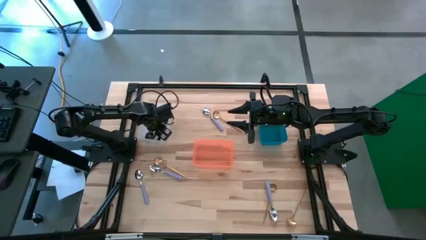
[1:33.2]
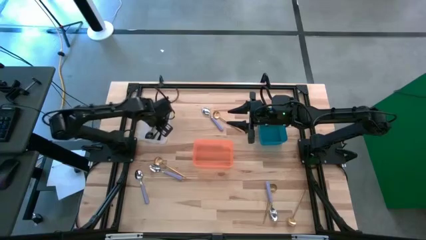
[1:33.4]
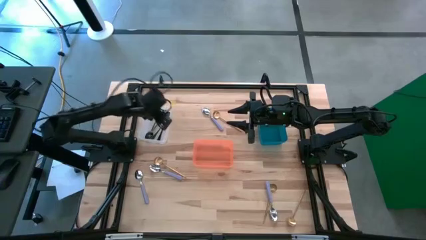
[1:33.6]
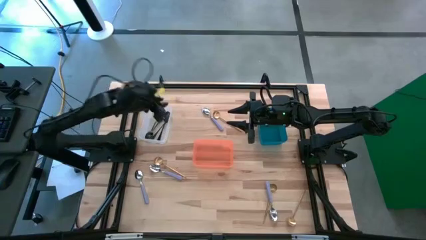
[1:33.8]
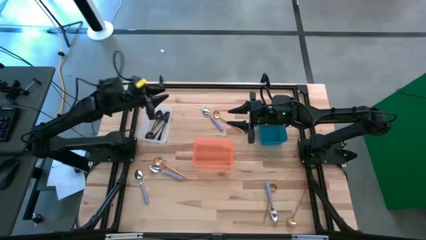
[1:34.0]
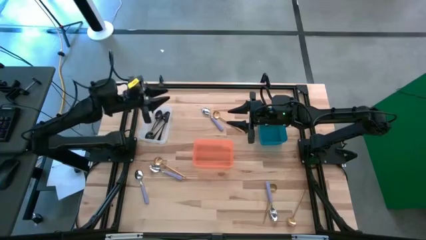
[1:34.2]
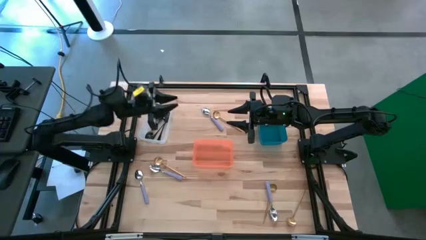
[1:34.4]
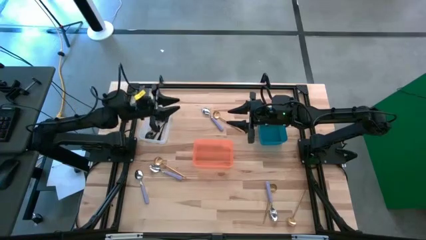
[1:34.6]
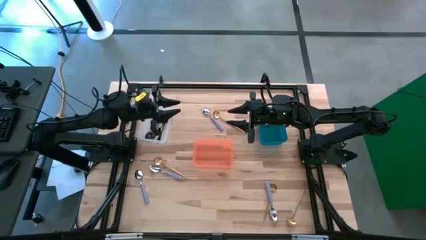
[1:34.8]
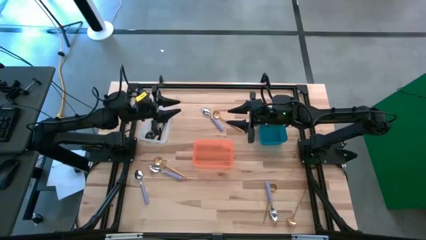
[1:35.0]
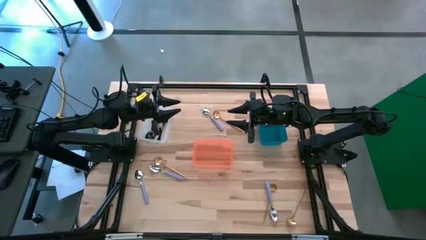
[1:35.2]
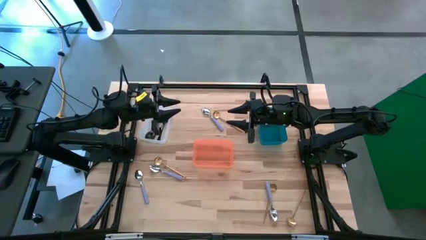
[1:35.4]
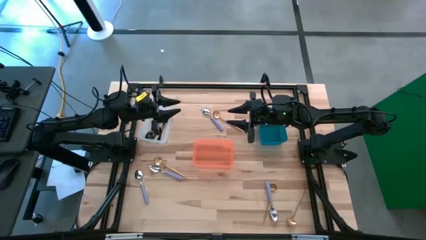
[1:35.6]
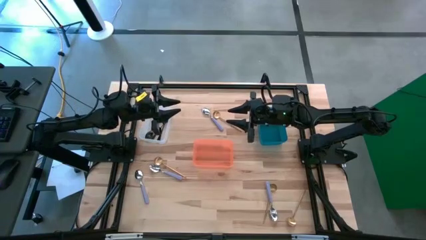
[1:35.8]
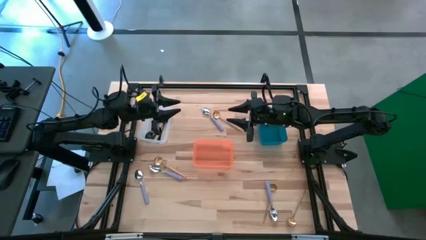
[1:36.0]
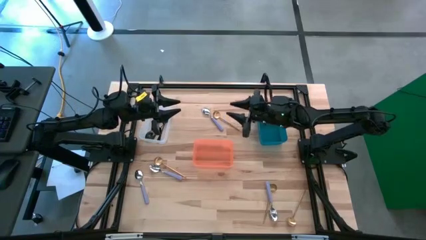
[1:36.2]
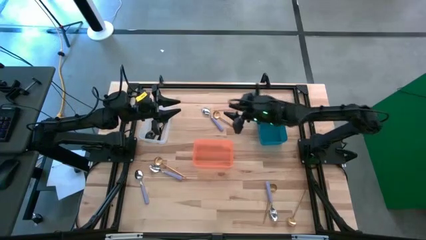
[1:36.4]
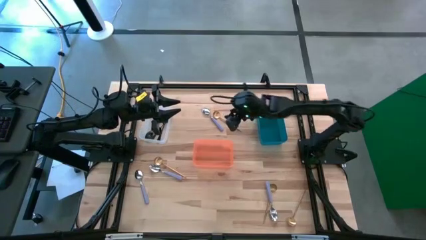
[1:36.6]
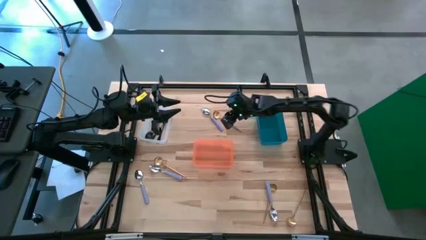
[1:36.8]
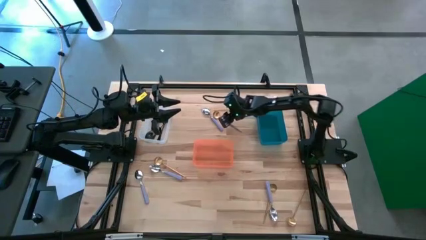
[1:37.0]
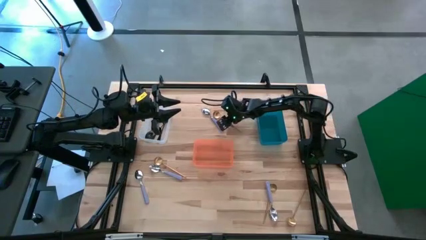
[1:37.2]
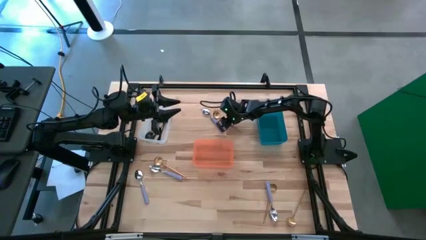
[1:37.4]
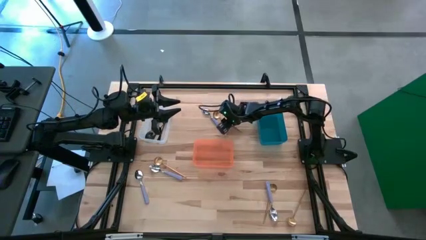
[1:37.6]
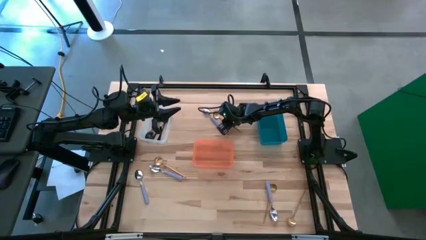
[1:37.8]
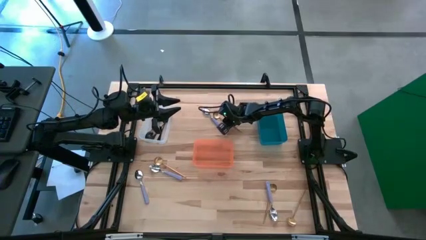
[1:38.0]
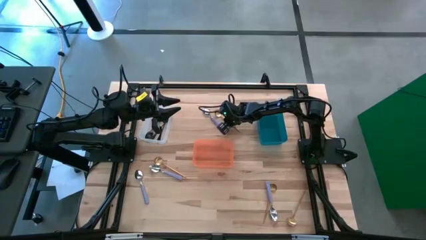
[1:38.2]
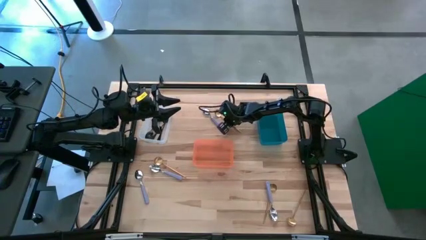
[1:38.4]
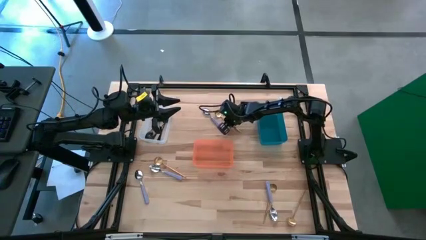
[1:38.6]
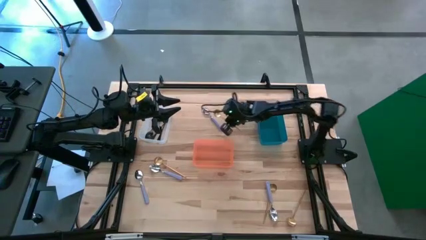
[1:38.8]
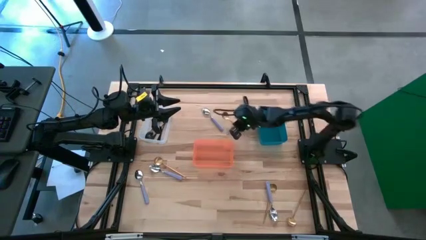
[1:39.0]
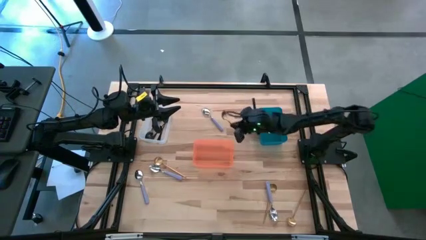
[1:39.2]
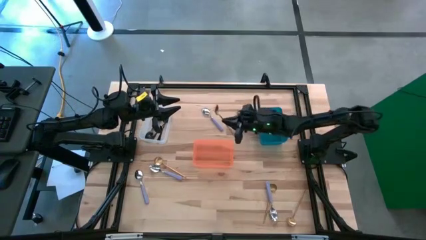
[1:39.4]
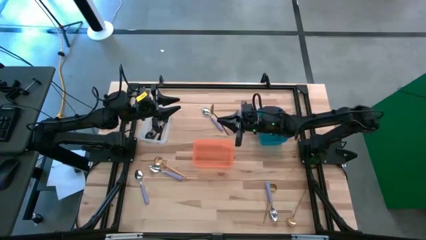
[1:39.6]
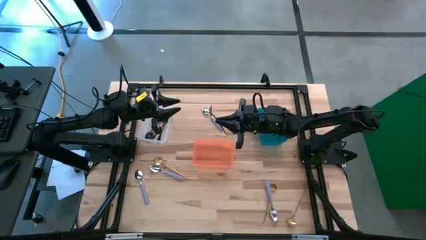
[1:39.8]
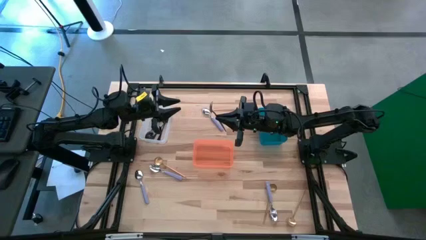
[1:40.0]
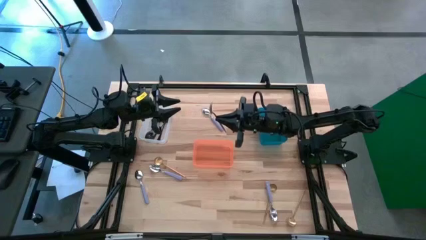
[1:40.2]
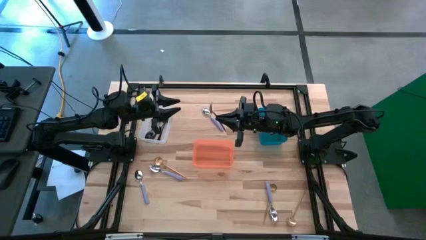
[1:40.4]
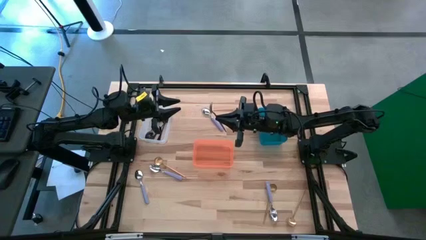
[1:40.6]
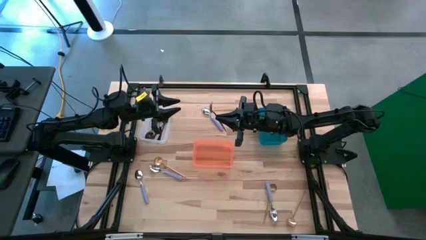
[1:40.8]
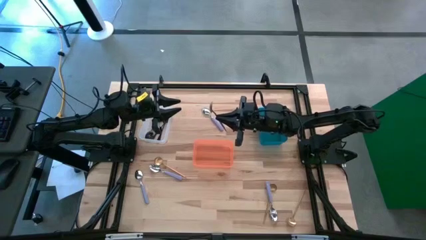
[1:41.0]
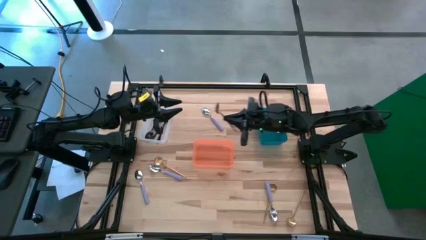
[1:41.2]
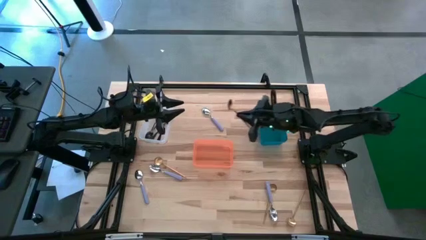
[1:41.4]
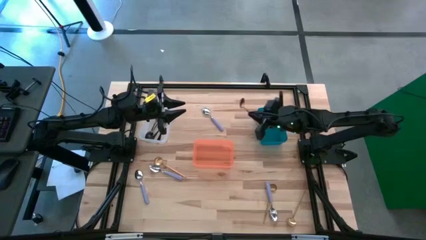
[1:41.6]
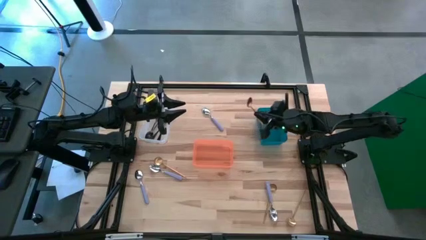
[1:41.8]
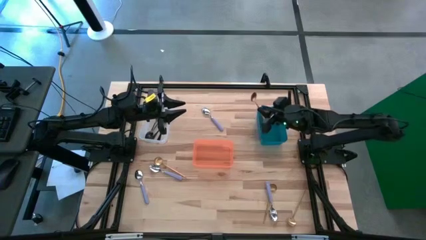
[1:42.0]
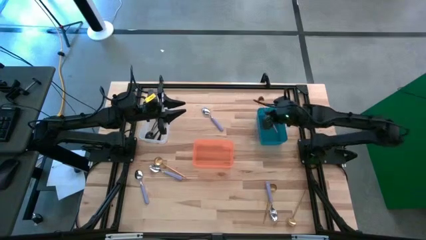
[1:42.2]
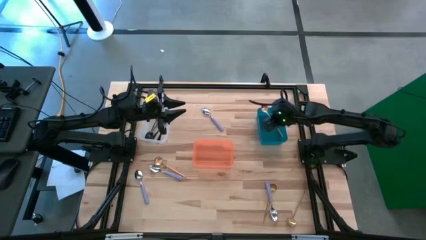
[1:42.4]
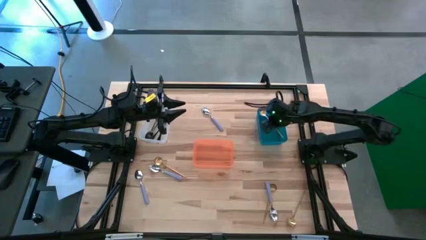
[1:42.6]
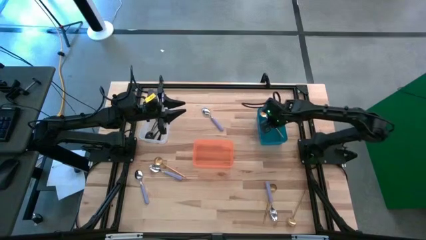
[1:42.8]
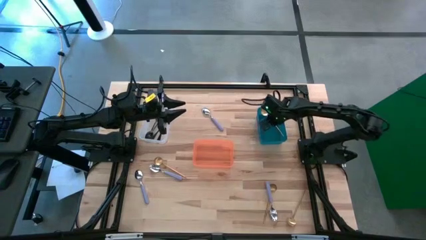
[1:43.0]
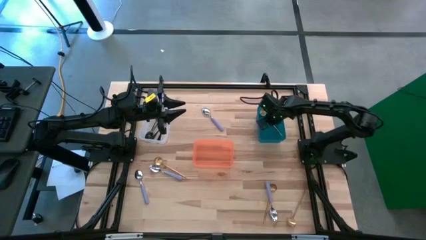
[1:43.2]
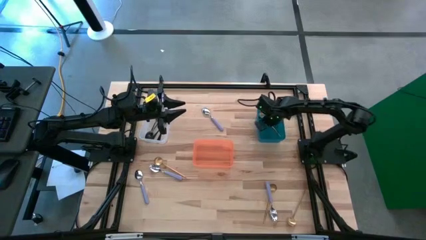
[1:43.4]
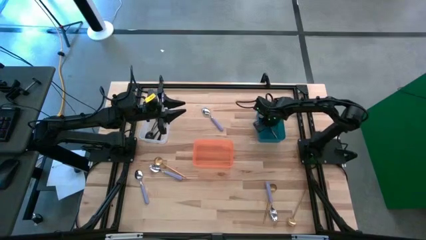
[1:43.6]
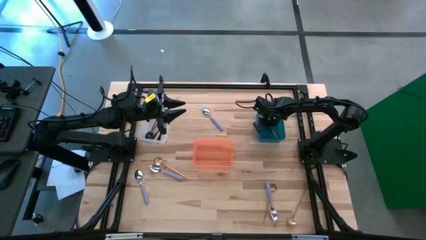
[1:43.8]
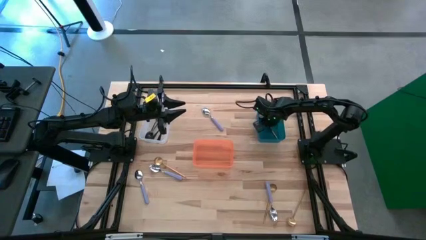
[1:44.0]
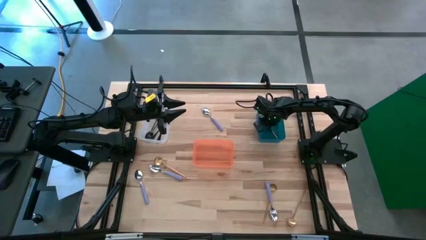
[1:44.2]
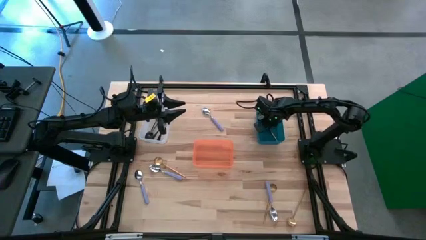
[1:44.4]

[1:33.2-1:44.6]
Task: Sort silverware by color (type)
Put the top center gold spoon into the blue bin

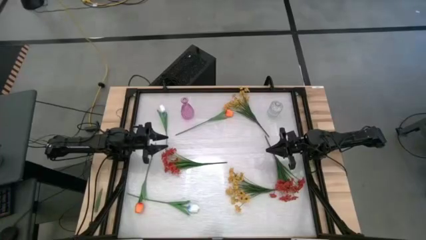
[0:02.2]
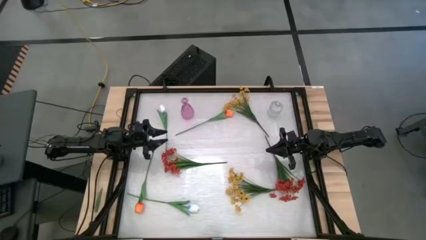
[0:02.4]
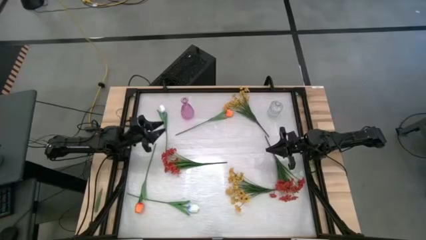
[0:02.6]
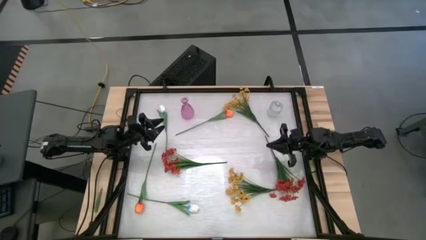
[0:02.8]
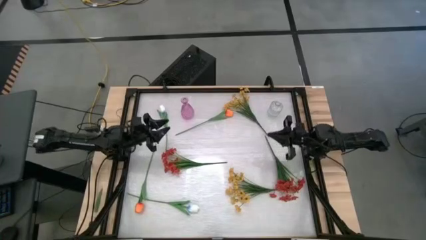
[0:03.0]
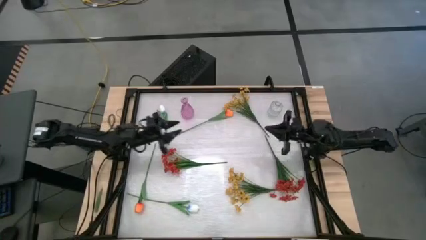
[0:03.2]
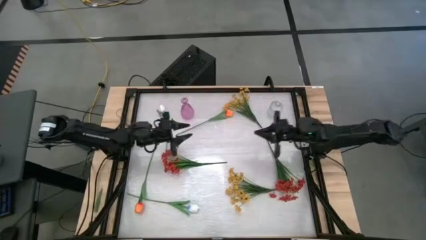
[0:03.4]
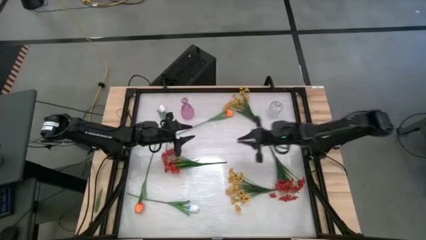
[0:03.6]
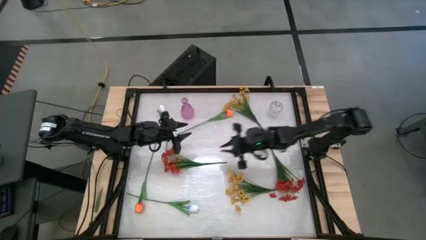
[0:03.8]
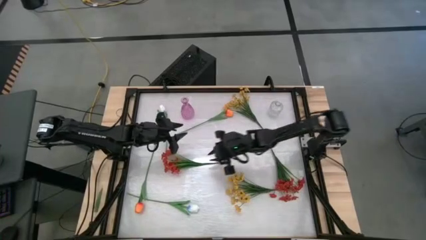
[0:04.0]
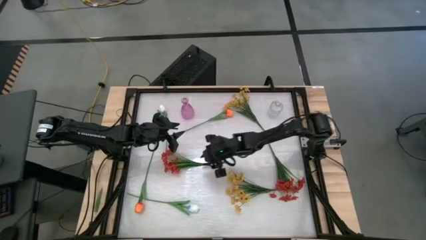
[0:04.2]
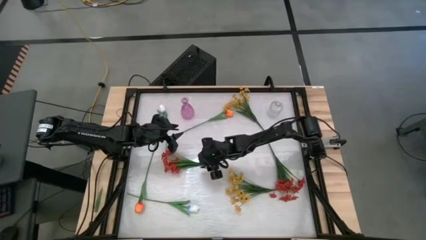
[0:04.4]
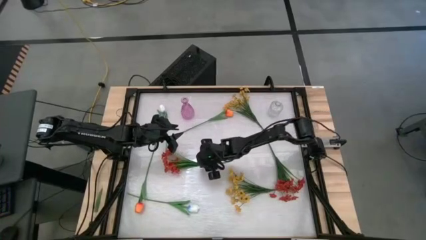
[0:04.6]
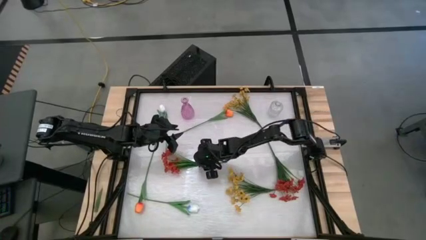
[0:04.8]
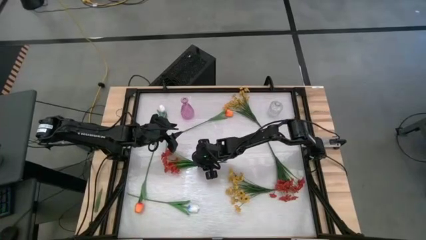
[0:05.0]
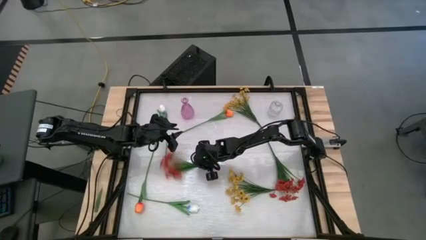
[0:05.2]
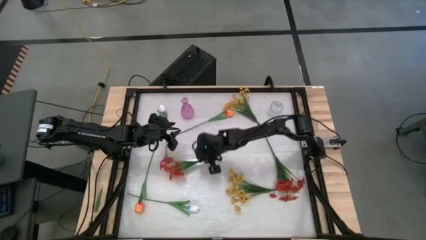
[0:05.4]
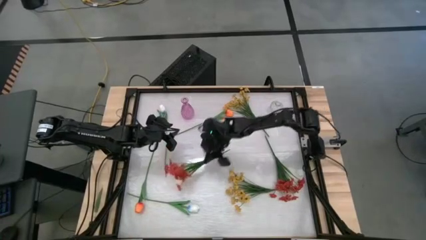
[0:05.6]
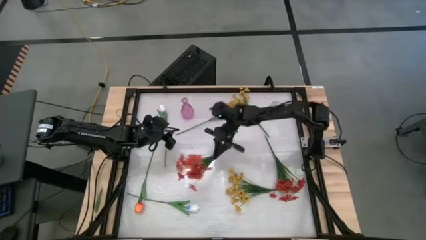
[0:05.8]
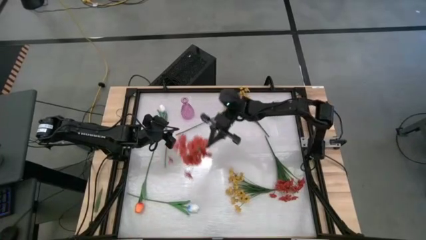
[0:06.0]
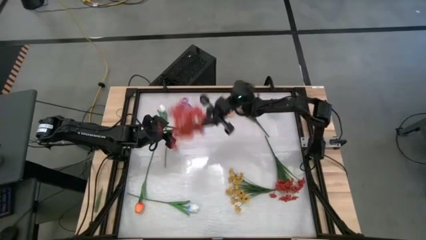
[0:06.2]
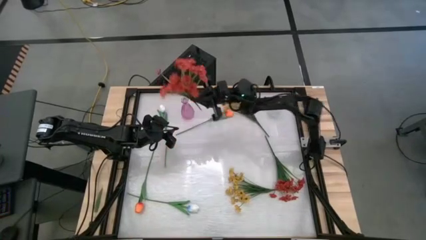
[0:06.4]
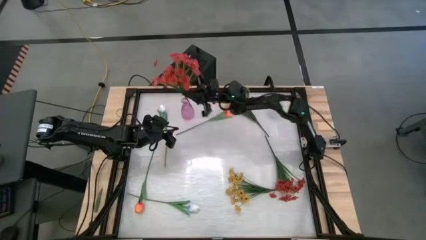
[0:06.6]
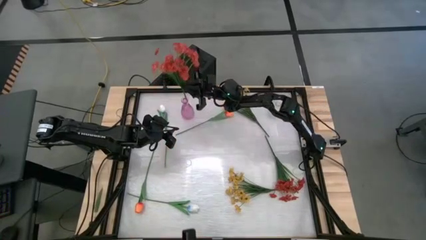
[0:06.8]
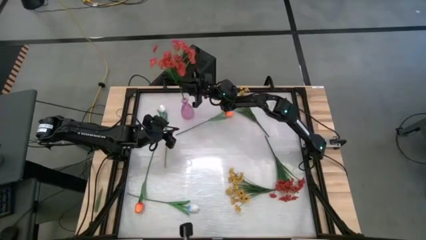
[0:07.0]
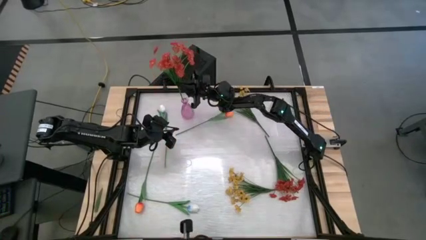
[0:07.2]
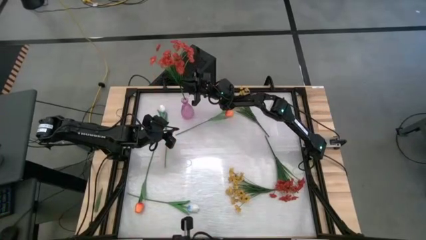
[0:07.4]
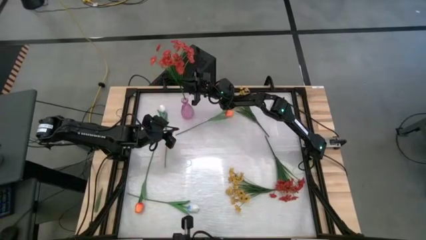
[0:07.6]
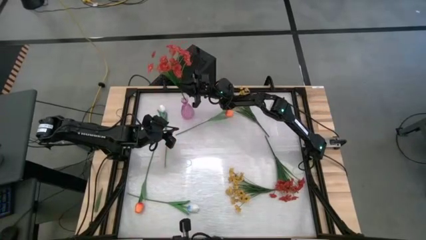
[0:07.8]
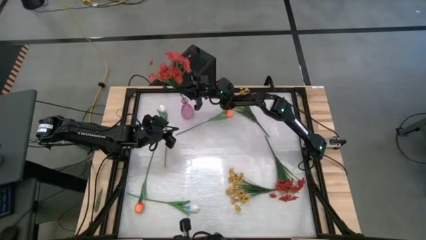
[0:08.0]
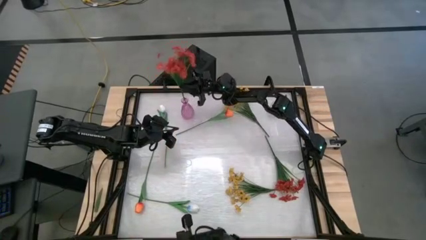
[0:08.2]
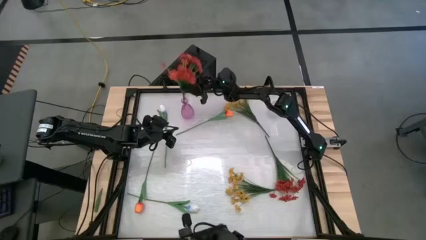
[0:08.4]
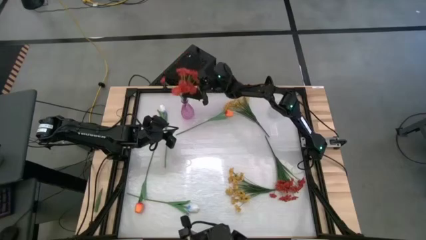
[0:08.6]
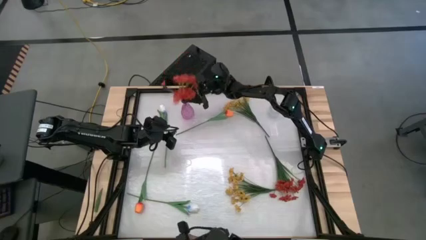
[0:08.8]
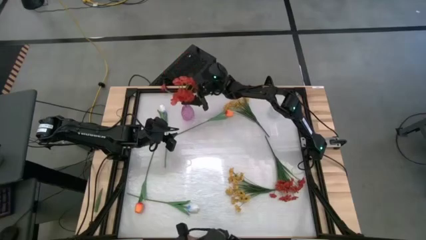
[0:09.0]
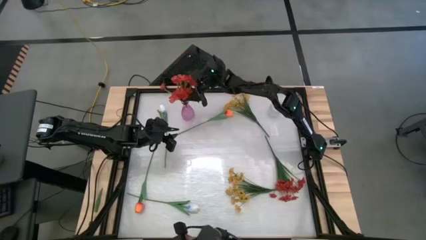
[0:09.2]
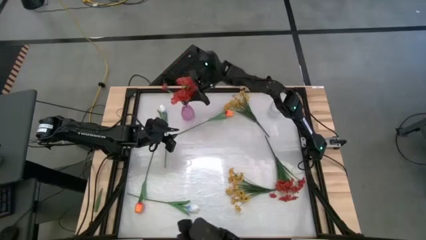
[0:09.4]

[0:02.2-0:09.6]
Task: Sort flowers into vase by color
Put the left red flowers into the pink vase
